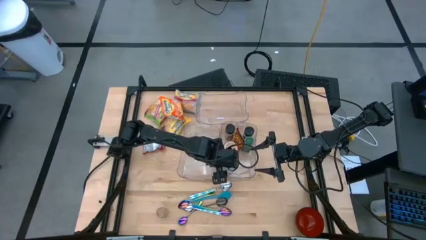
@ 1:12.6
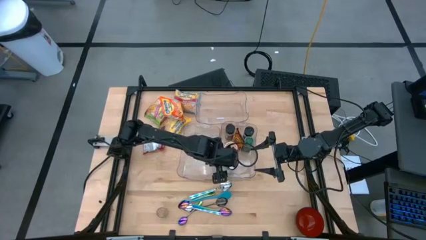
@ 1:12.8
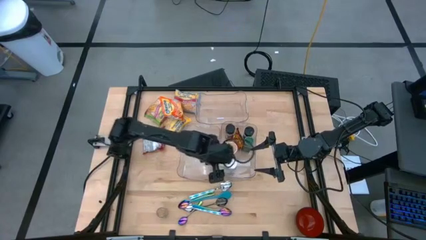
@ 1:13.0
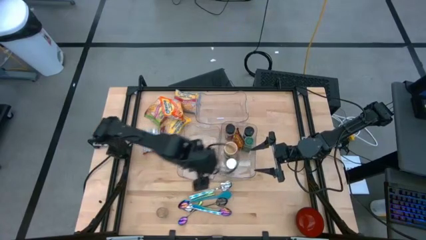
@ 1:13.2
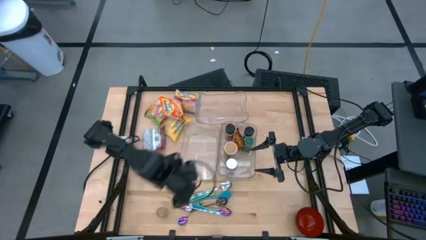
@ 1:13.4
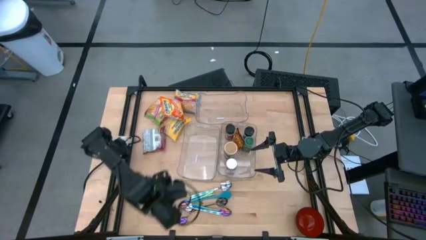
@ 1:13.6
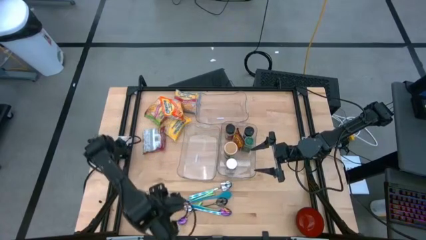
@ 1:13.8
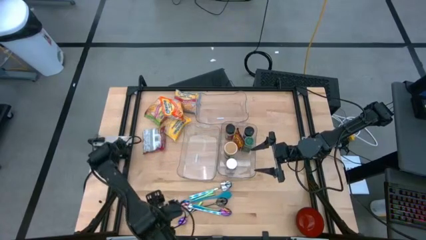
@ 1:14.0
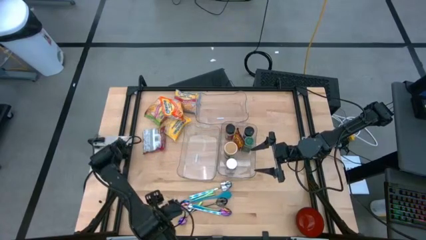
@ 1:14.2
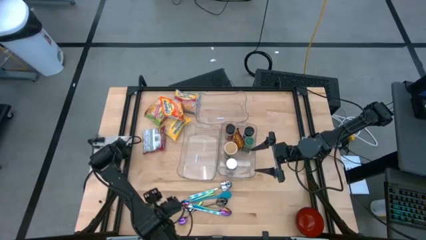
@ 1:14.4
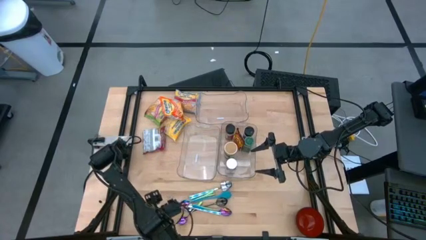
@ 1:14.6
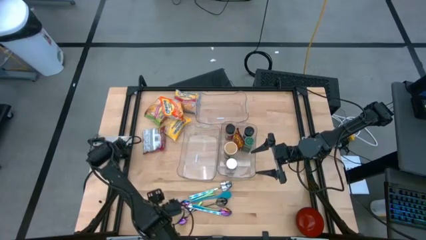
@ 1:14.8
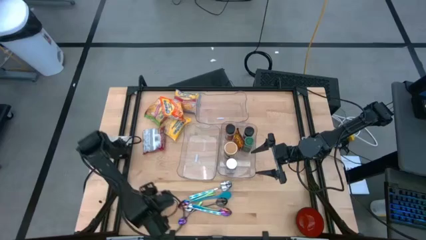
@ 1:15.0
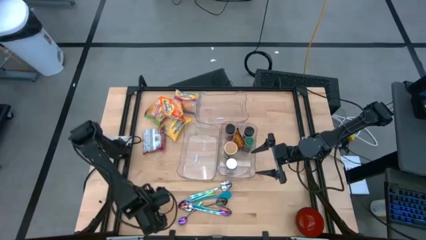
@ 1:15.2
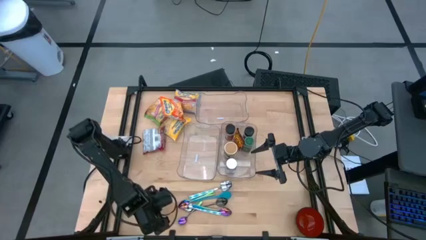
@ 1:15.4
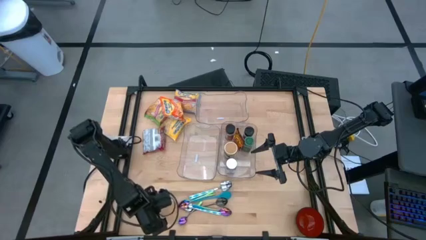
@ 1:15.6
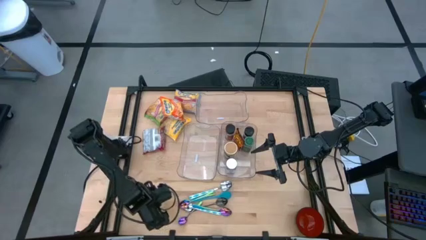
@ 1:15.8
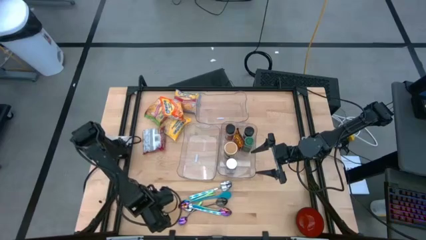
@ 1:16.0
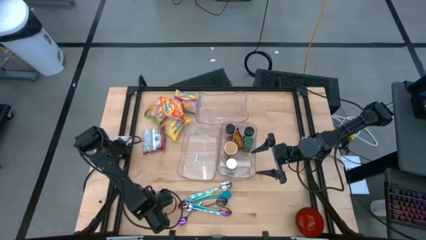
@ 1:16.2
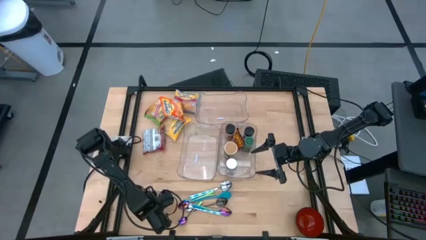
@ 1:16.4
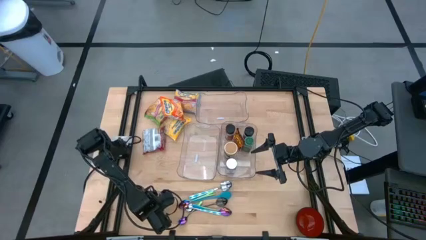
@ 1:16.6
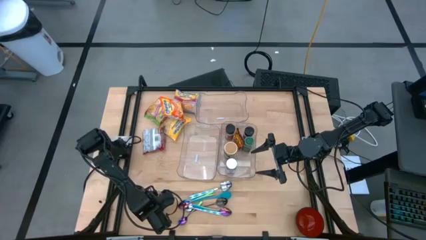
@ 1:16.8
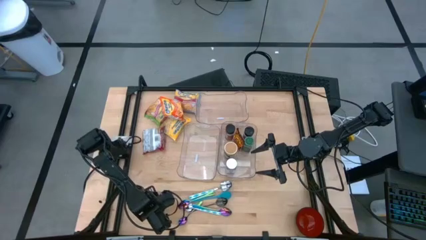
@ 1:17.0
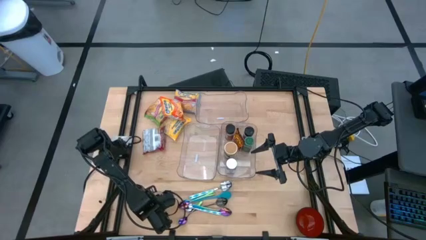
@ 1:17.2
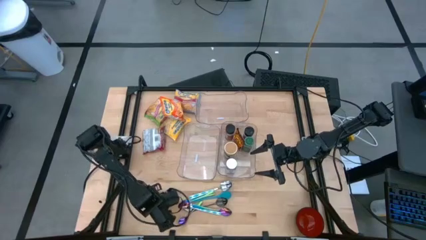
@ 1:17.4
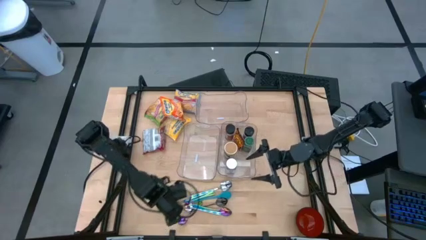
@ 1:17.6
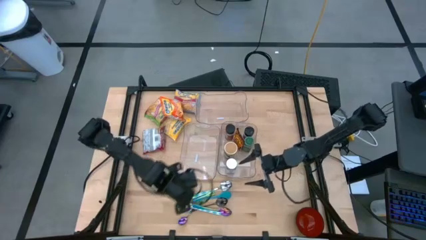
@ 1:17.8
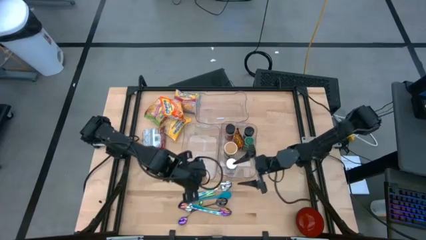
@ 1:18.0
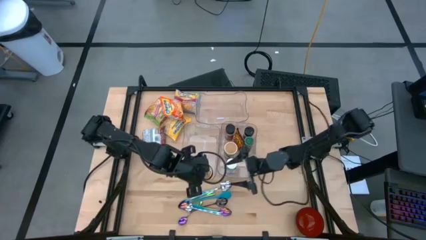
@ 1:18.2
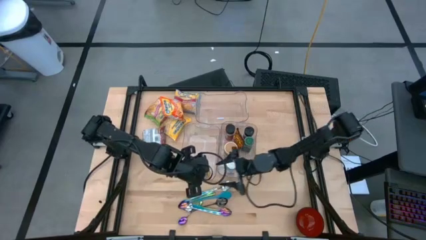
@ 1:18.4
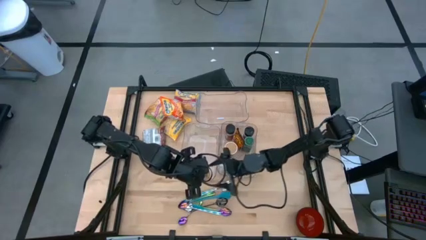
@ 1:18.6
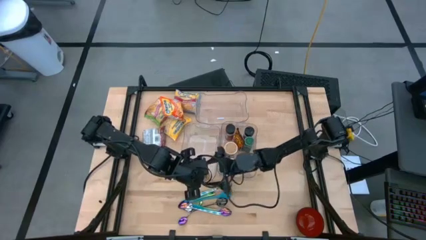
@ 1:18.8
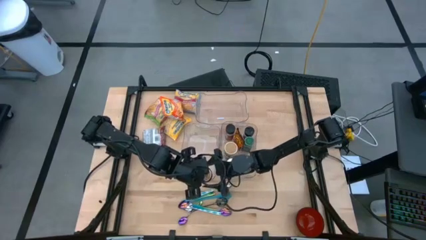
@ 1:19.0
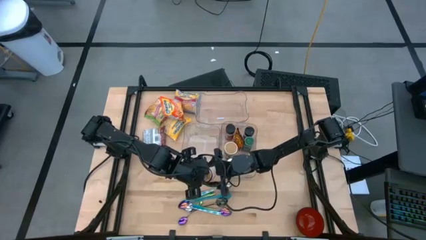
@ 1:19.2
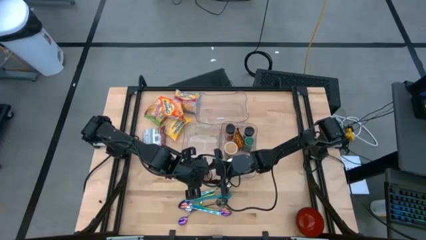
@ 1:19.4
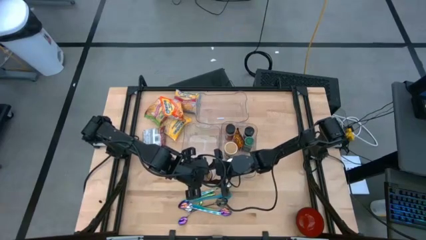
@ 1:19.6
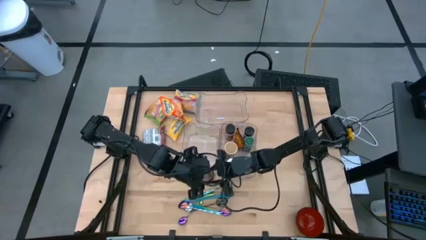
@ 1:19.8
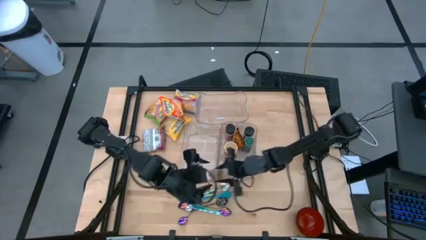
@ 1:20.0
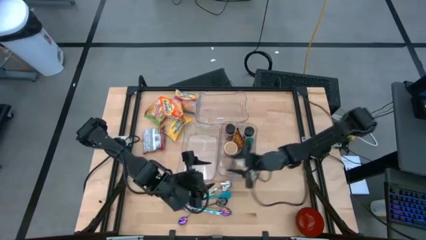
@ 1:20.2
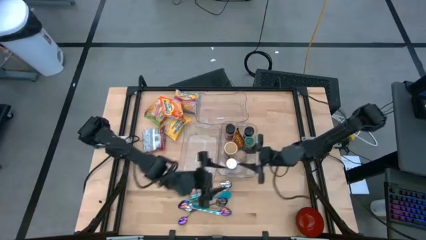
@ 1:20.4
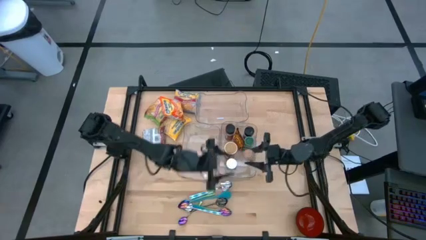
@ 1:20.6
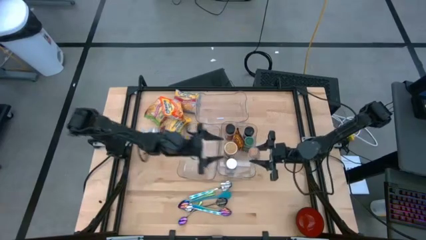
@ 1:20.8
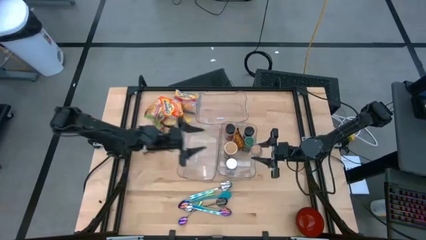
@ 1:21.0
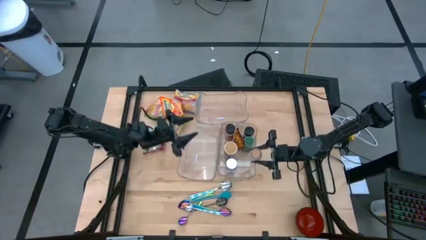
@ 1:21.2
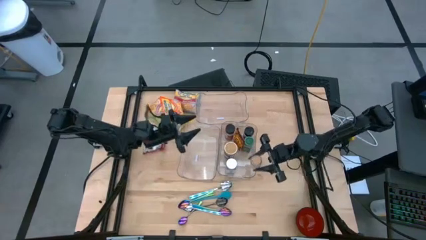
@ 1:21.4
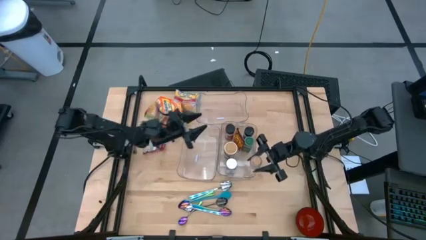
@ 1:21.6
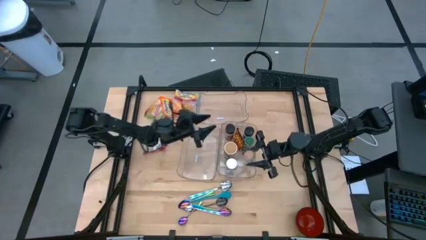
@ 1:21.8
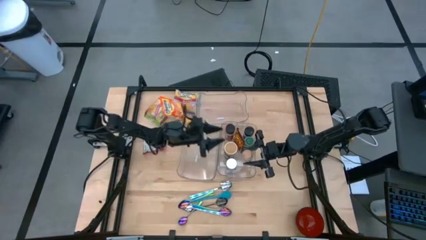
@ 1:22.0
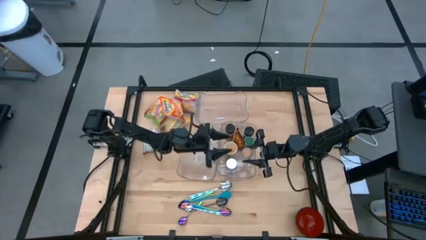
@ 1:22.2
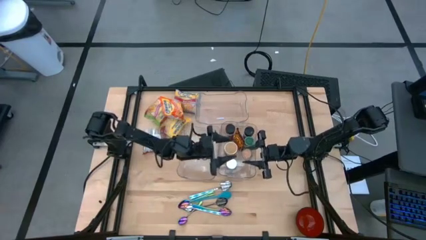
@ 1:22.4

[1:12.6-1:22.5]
Task: Pick & Place Food Item
Put the brown seasoning bottle into the bottom right transparent bin

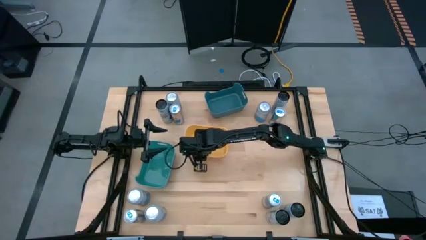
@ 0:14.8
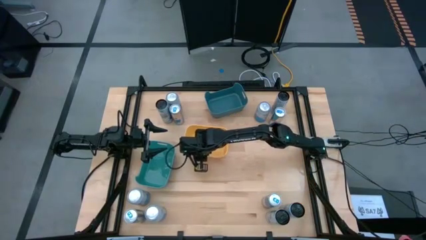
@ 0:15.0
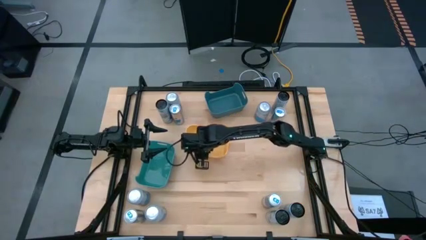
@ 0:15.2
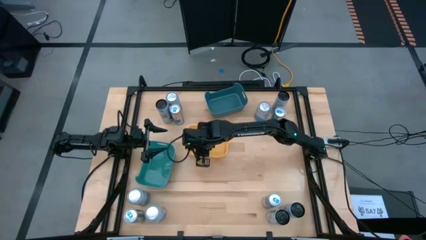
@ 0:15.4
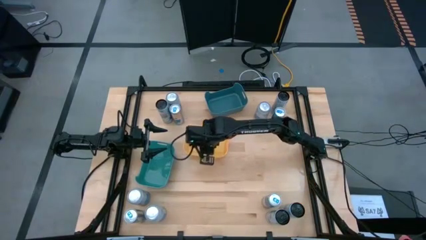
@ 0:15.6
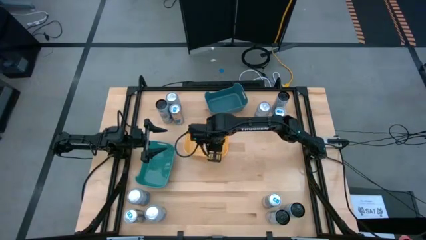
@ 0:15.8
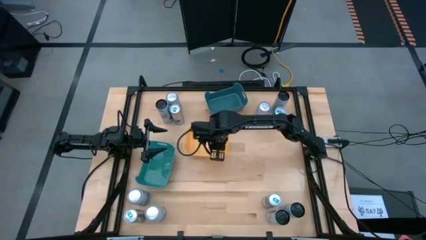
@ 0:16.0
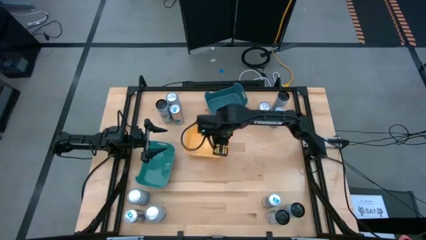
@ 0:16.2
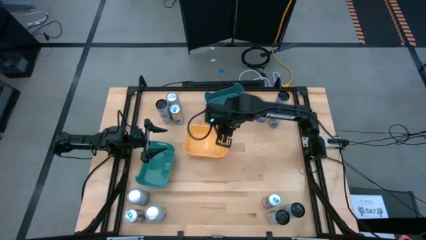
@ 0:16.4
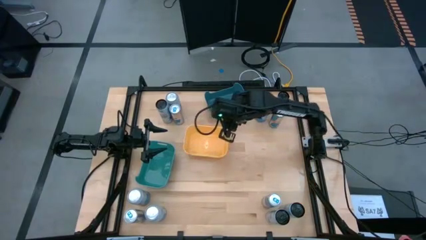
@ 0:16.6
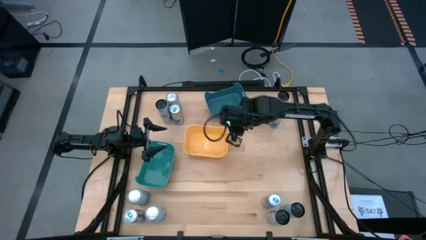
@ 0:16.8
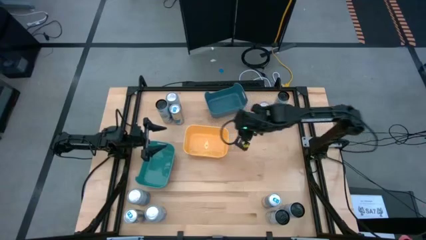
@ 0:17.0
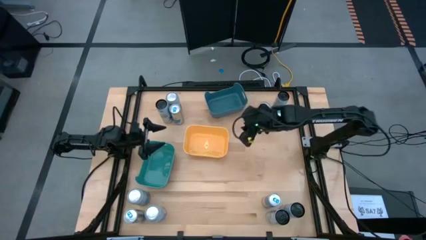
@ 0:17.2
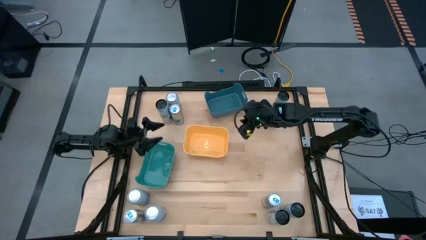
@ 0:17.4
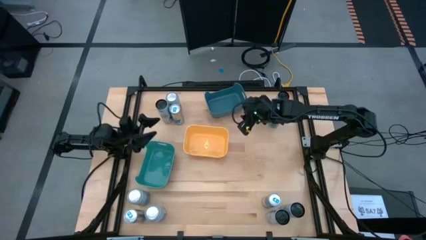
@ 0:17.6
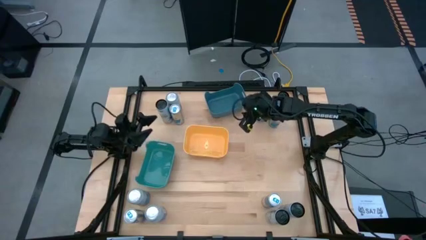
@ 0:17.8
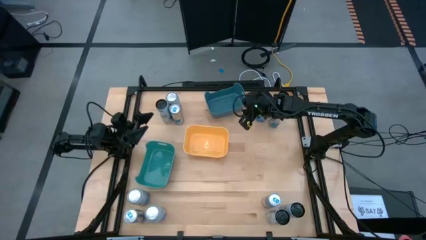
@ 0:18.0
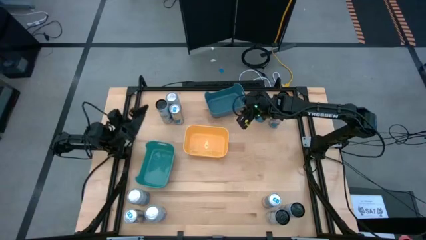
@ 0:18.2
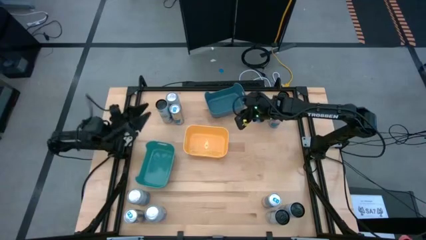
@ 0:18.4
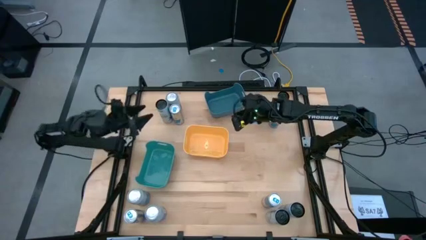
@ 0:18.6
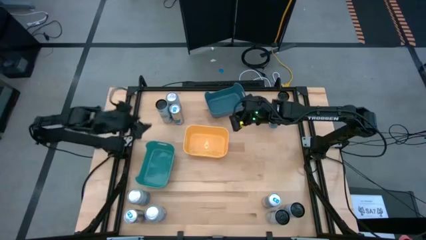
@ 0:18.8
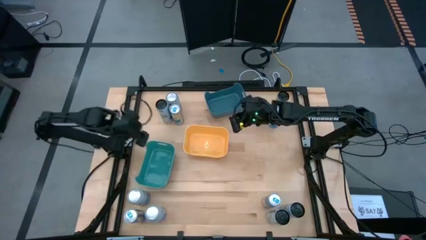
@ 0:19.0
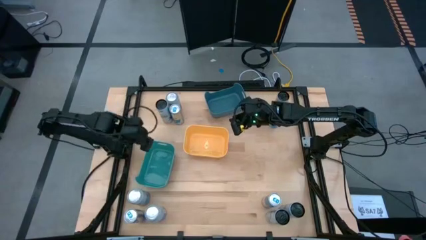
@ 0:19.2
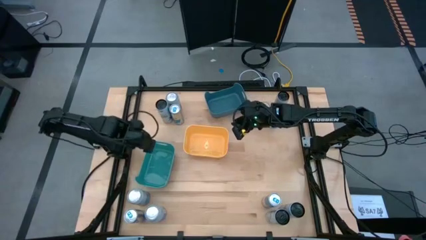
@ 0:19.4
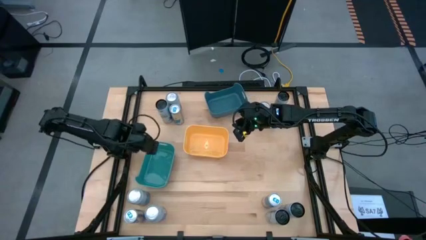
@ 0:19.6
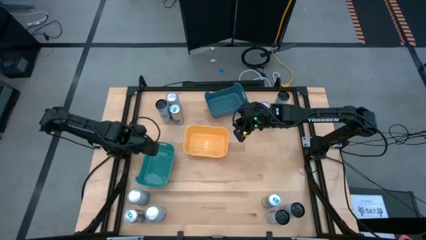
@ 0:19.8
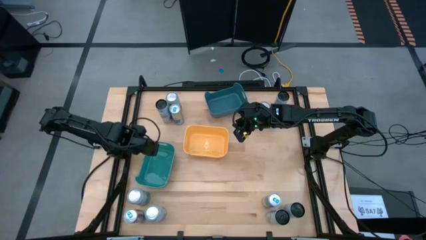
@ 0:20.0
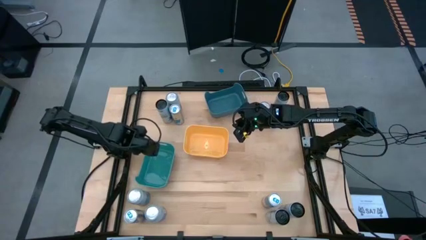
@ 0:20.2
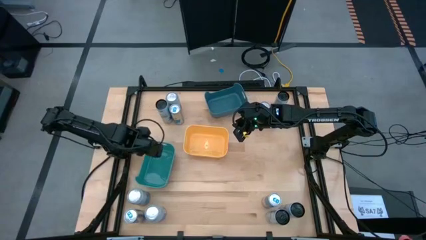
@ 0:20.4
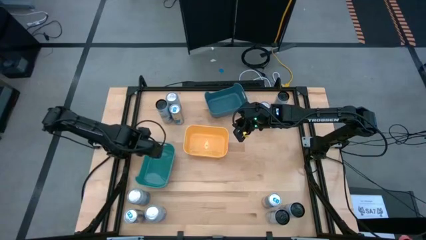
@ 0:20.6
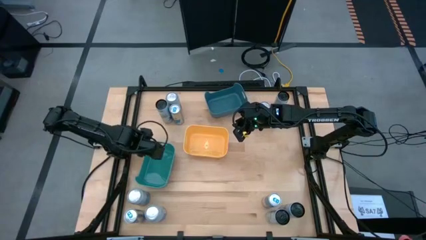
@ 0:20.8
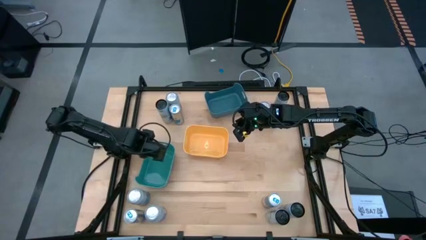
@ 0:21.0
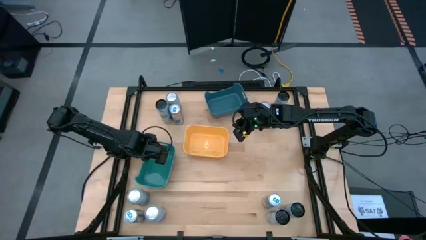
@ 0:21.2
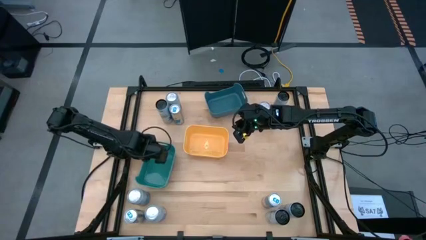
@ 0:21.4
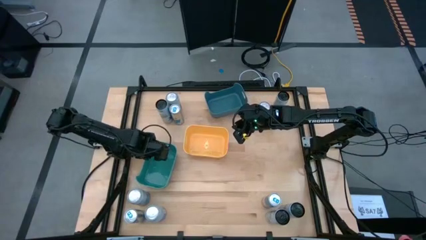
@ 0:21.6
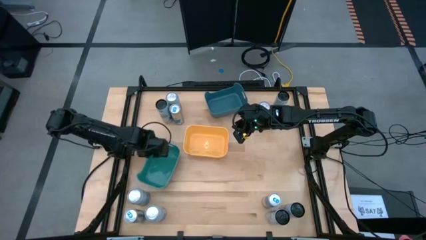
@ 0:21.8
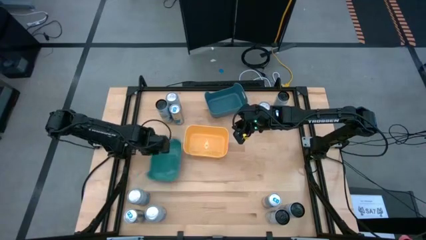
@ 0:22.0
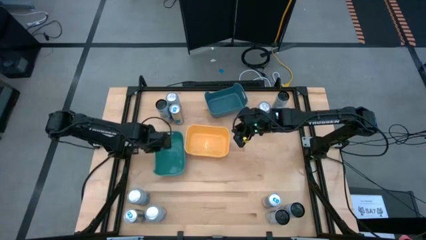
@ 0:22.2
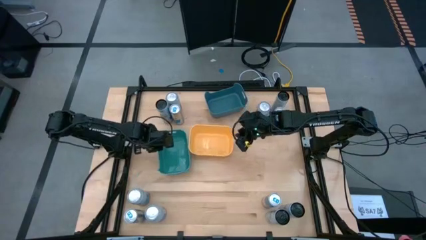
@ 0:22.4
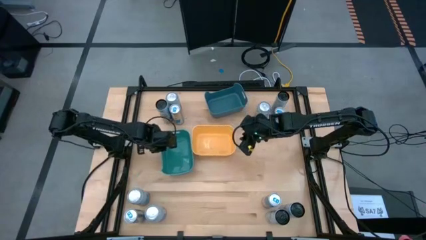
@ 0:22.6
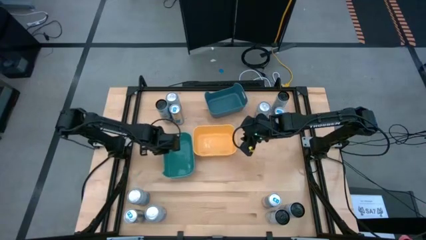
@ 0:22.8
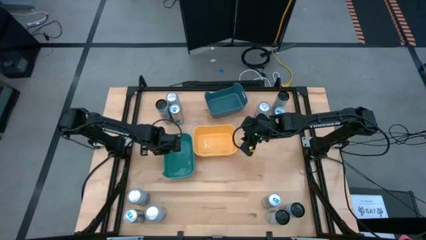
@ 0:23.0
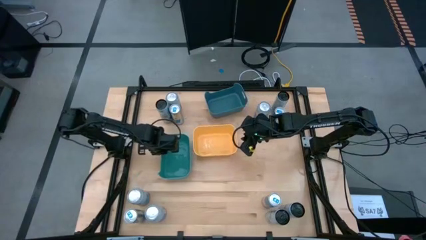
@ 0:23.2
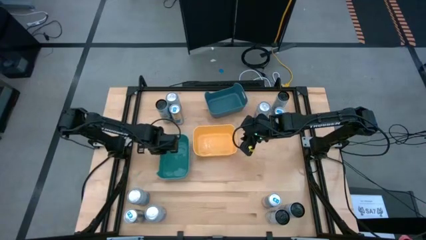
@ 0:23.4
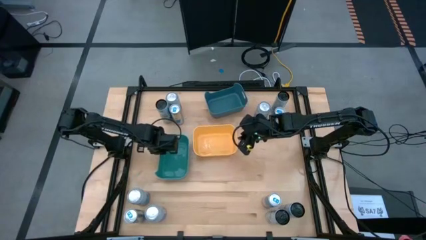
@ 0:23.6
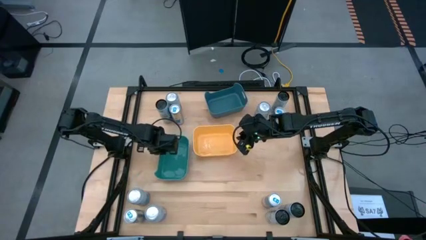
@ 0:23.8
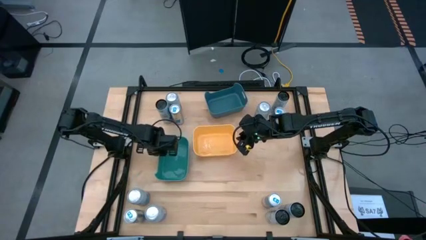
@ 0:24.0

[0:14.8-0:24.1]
Task: Sort soda cans
Adjust the light green bin beside the yellow bin
